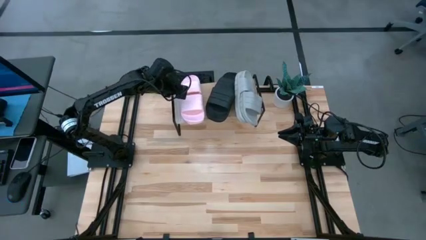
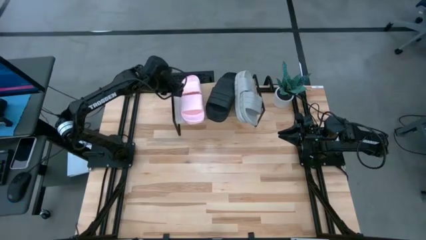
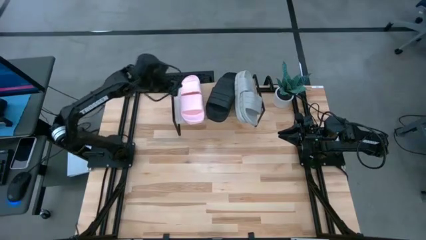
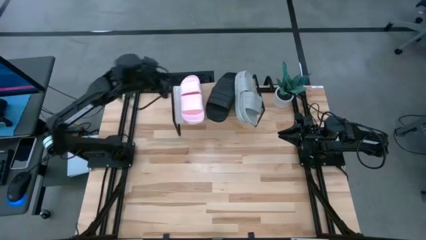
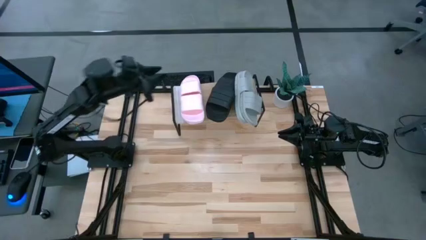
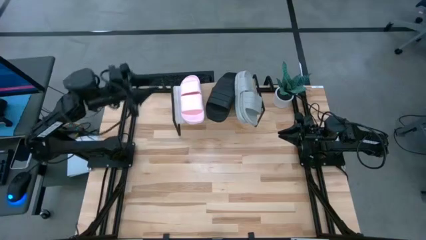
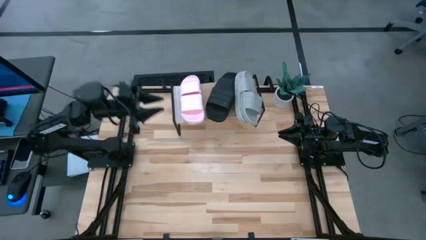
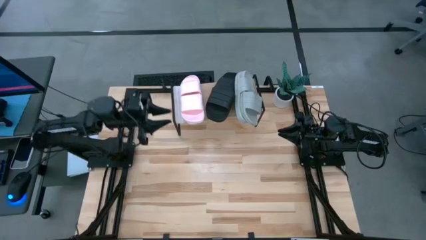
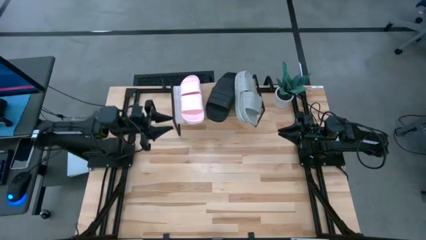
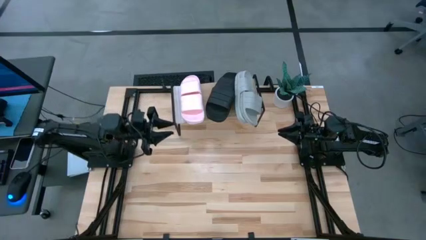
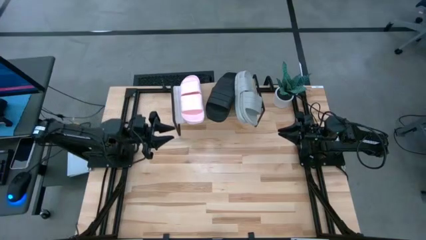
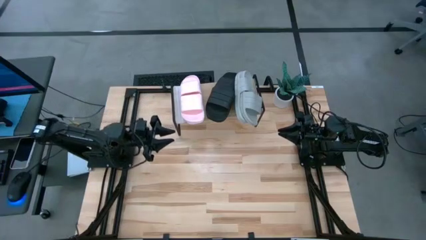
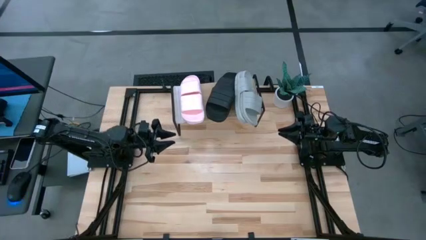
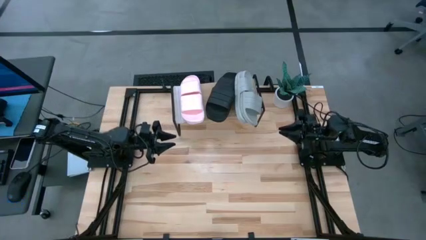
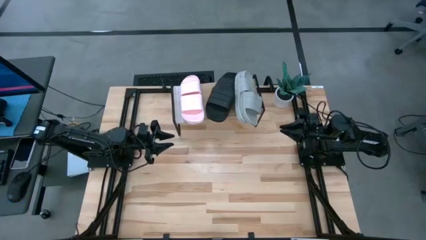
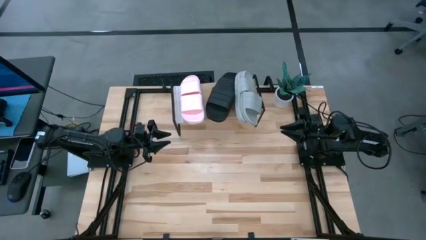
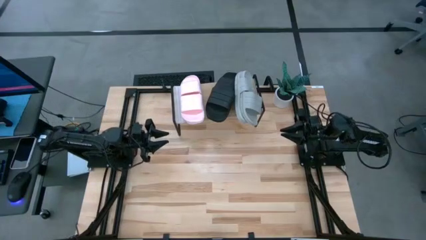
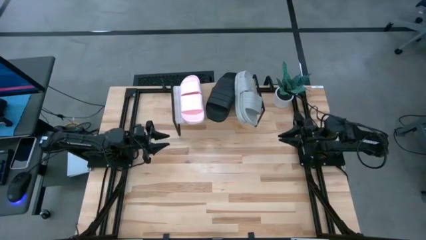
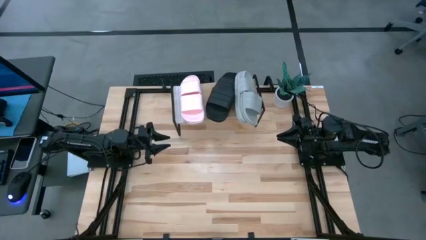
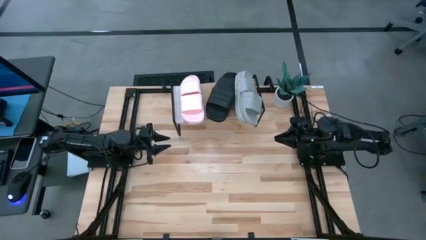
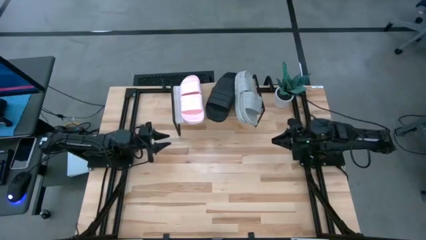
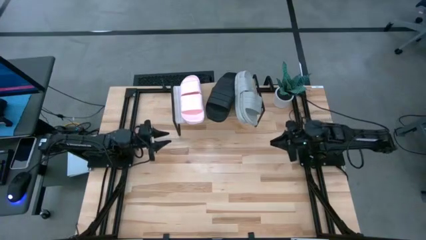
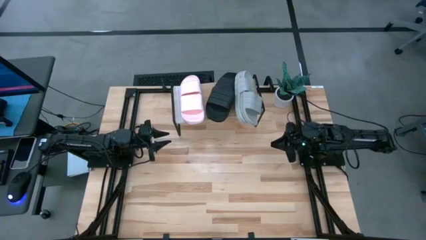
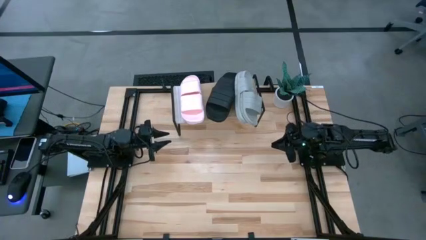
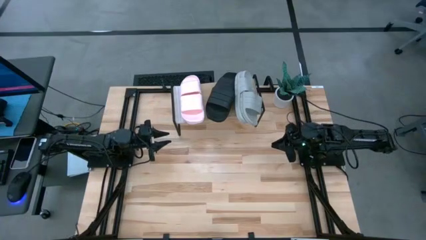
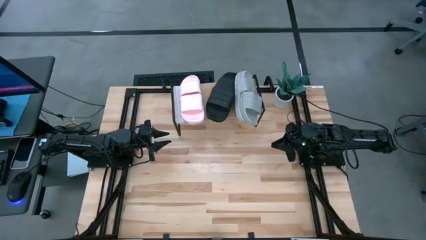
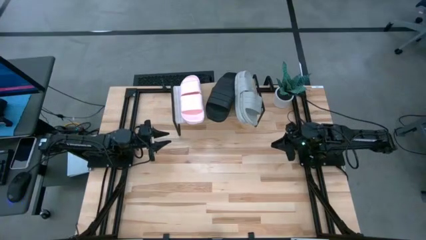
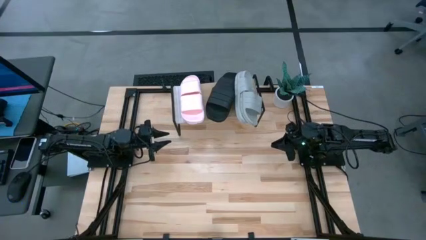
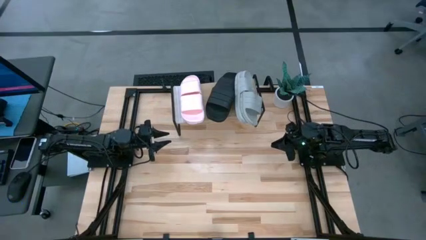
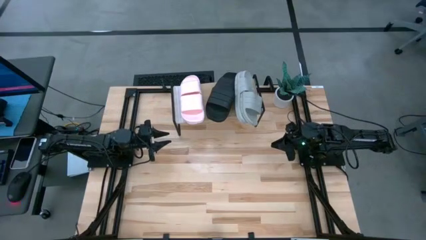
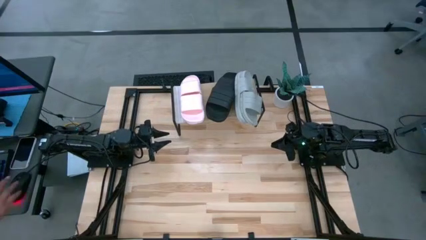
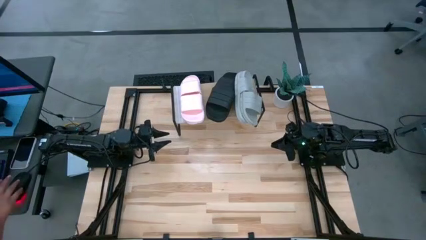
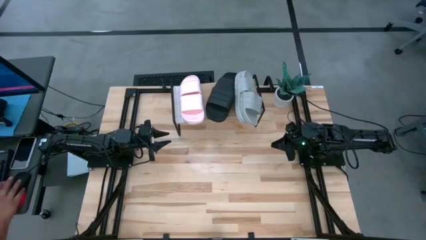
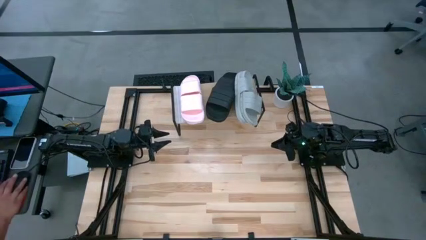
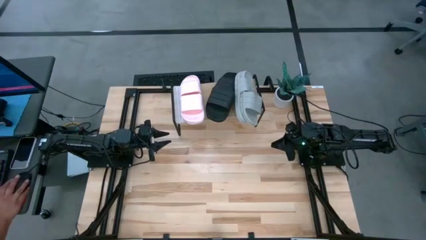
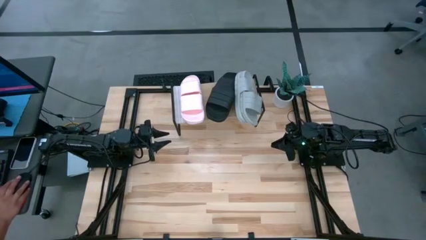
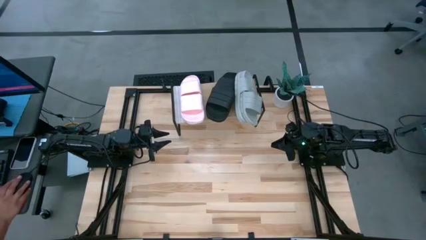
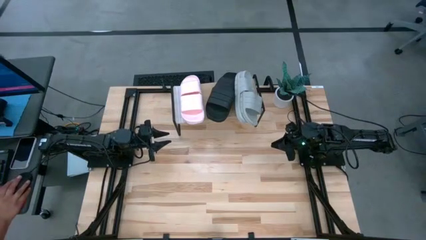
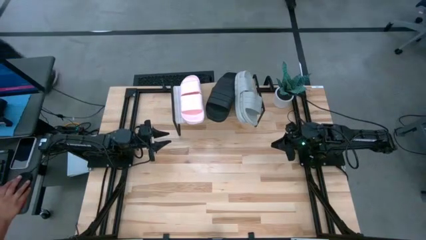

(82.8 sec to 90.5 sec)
Task: Pick and place slides into the shelf
Return to Home Position

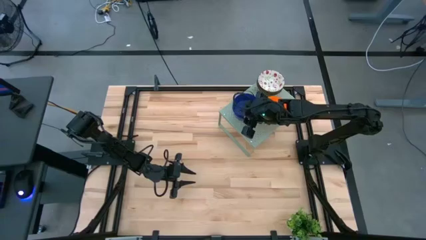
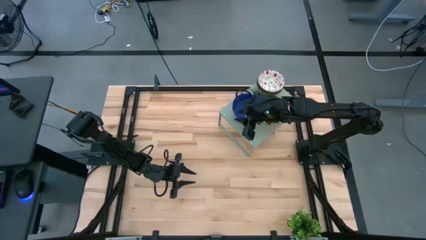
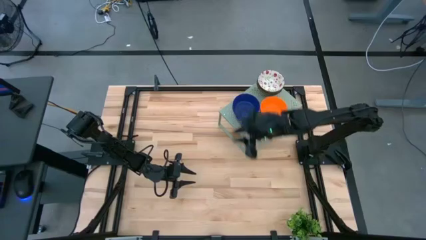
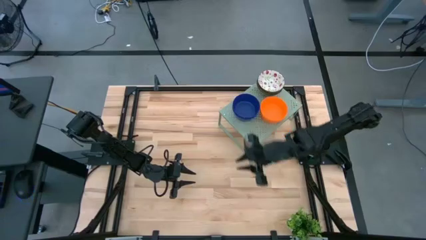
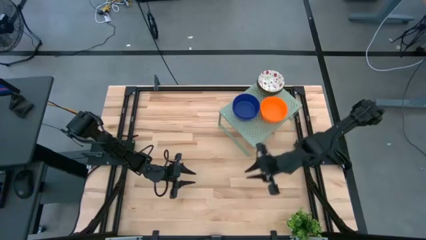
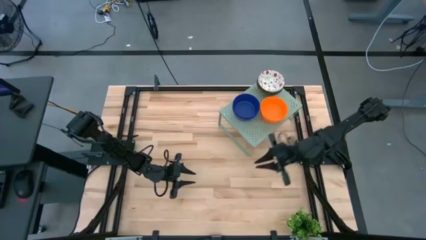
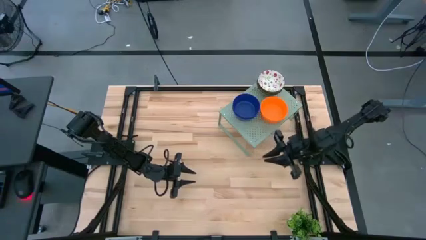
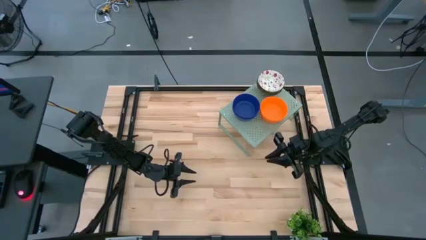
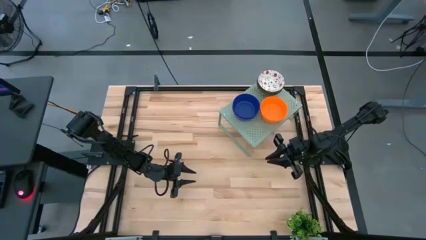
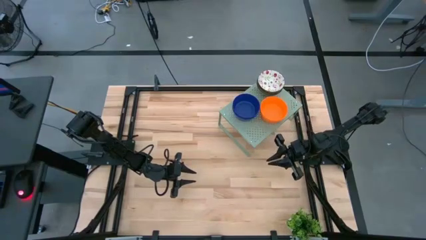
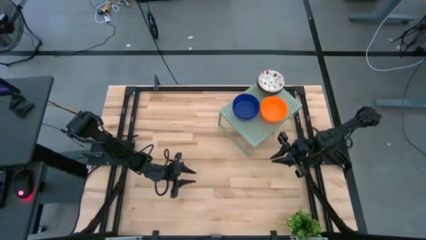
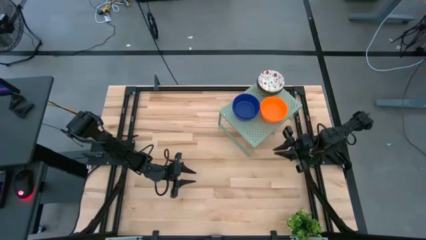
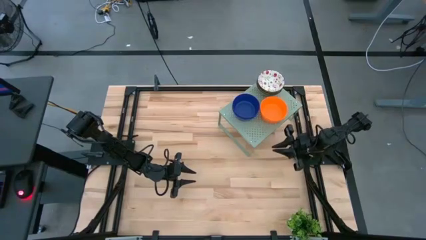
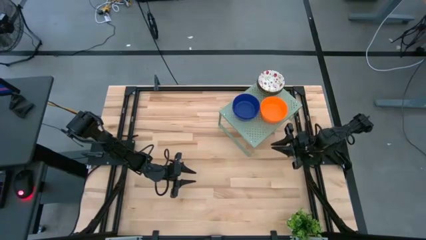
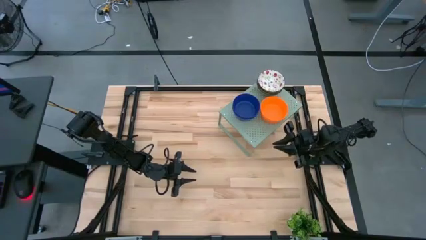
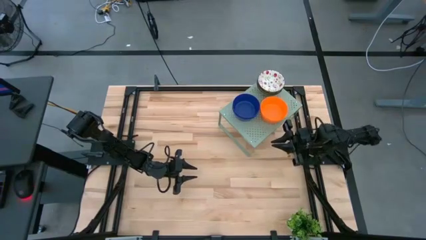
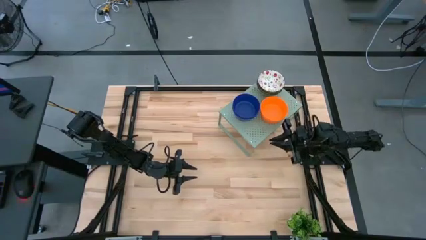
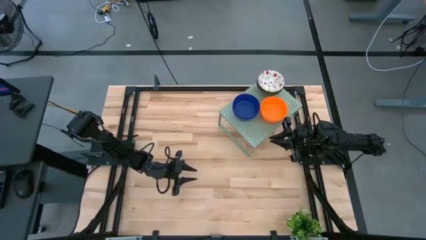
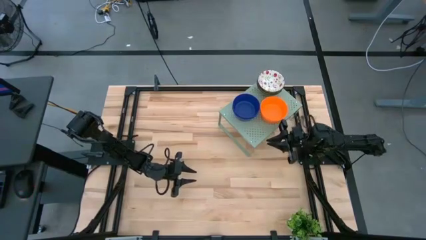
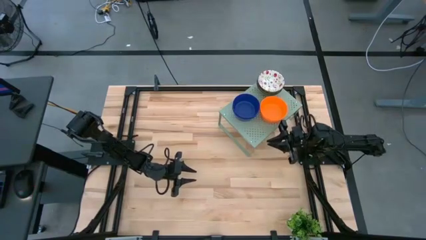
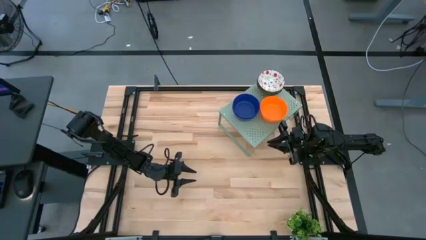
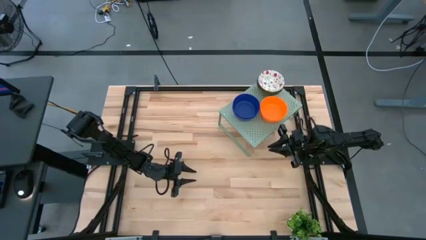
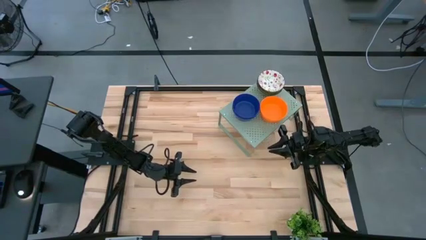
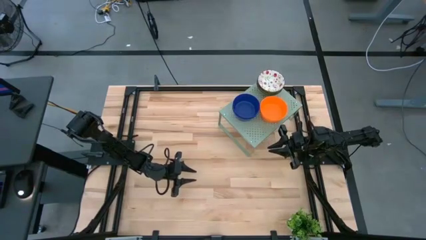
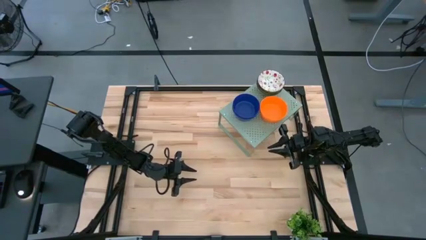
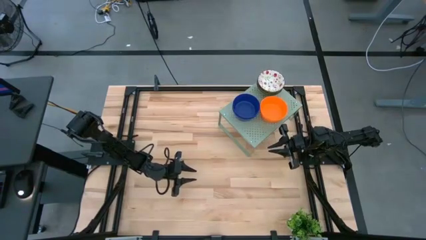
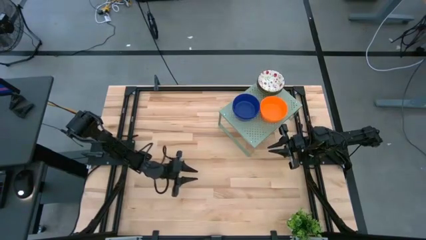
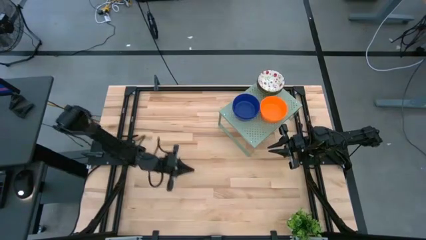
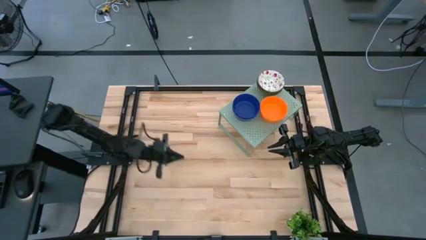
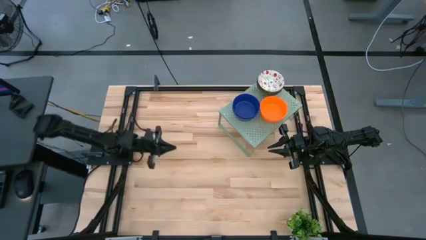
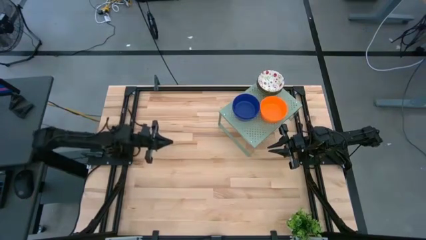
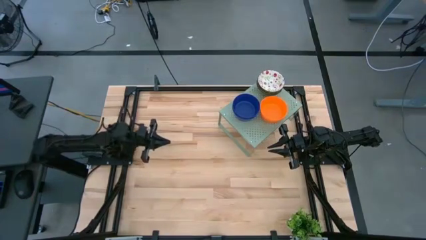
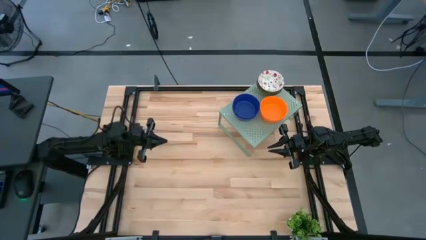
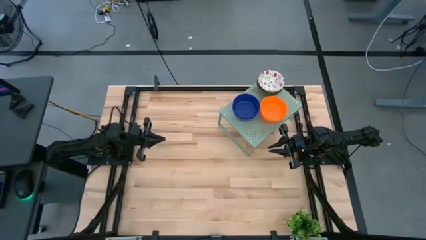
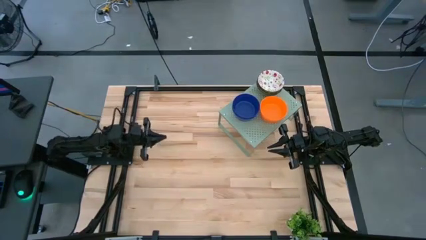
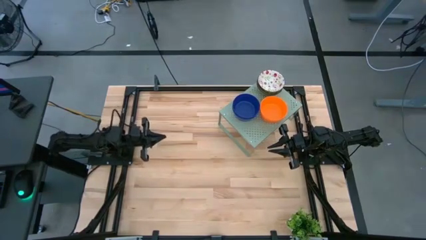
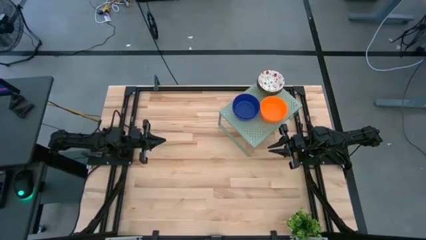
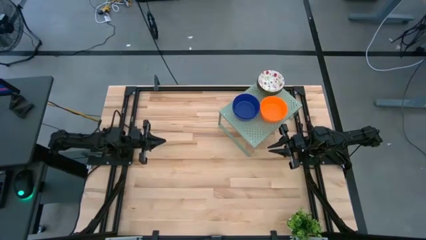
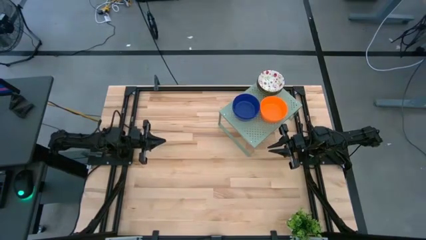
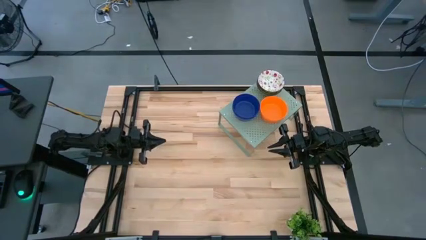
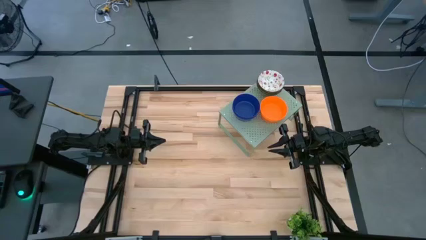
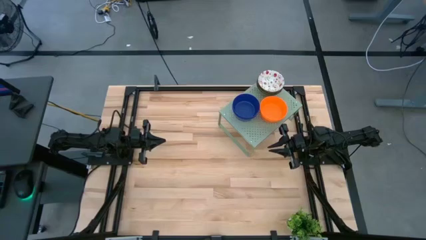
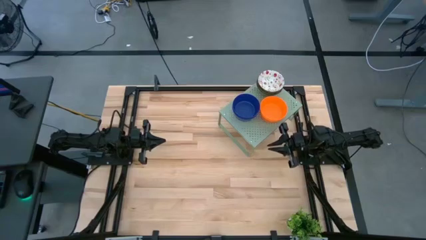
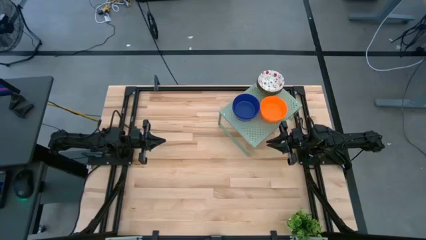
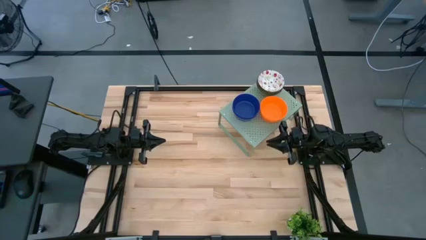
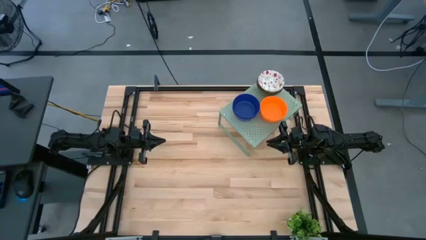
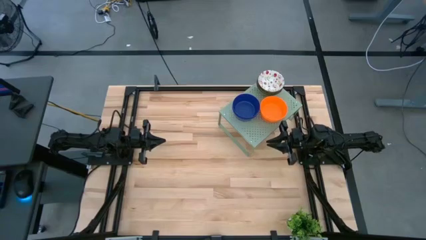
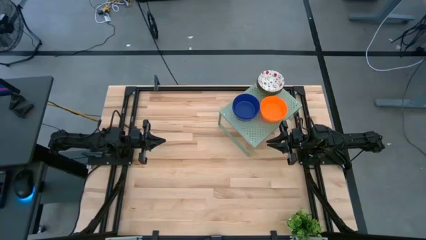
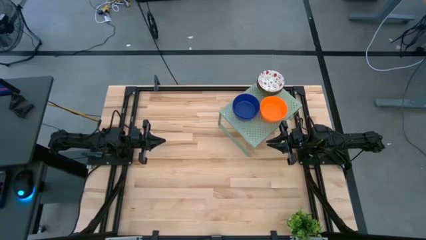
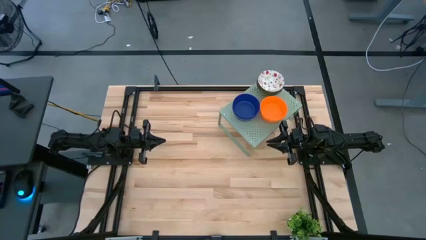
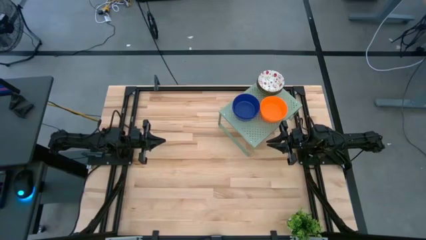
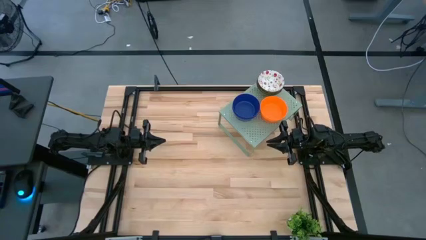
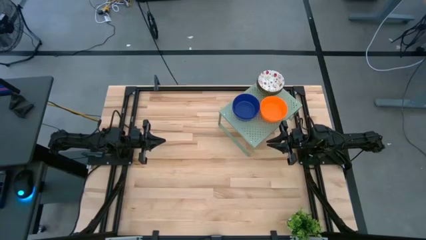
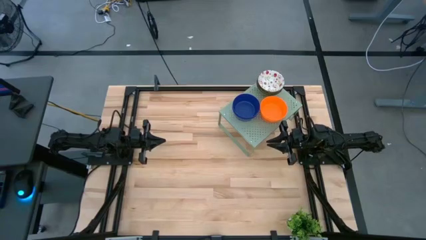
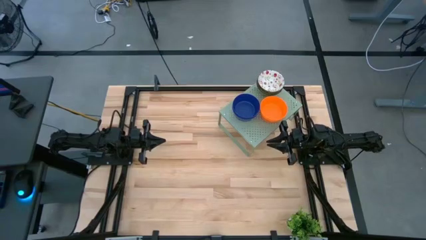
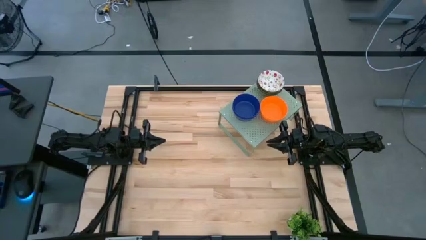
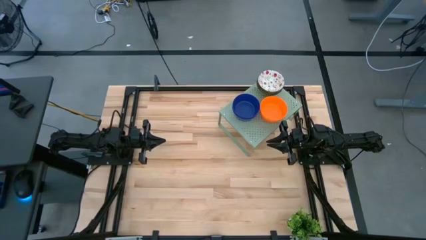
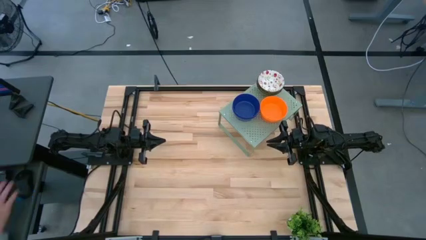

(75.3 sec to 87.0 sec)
Task: Pick & Place Mini bowls
Return to Home Position
